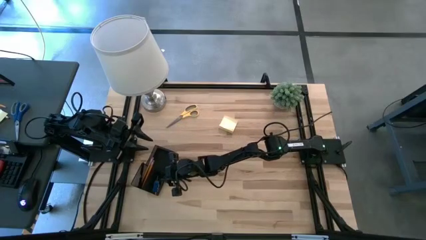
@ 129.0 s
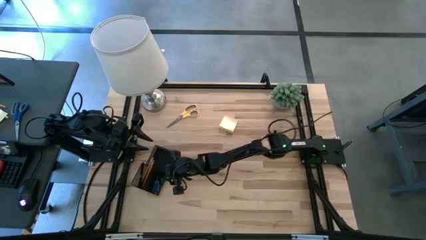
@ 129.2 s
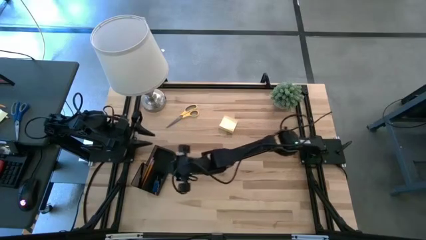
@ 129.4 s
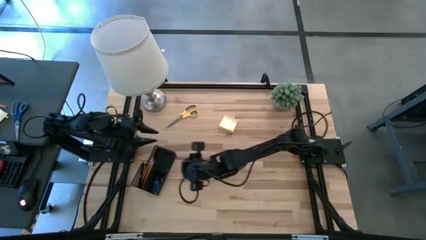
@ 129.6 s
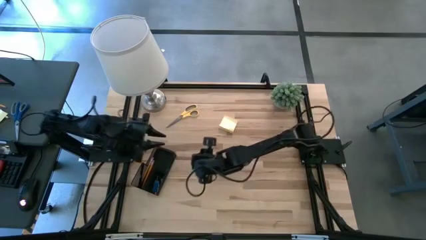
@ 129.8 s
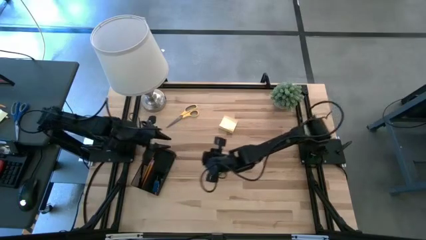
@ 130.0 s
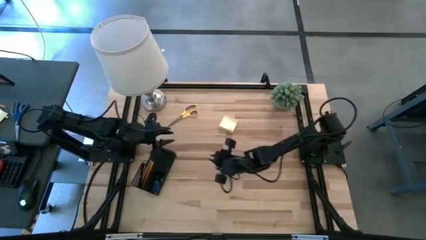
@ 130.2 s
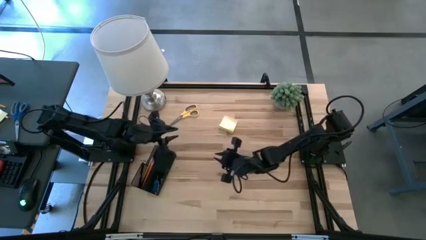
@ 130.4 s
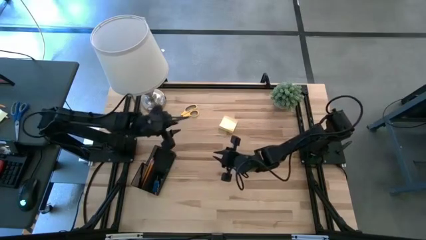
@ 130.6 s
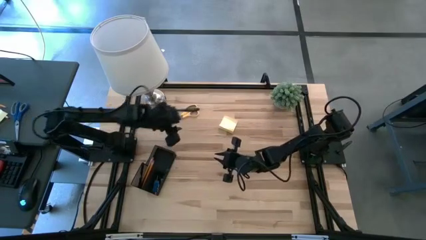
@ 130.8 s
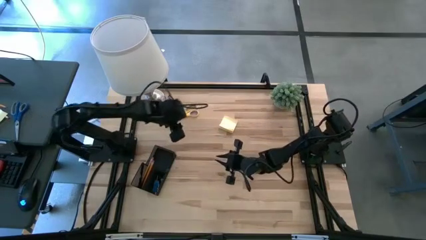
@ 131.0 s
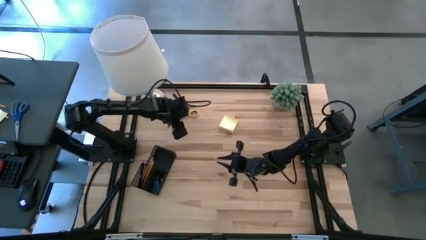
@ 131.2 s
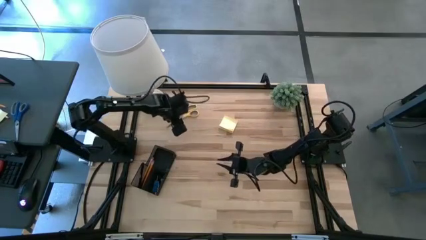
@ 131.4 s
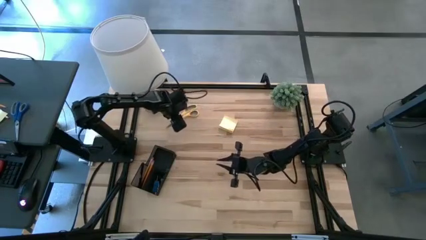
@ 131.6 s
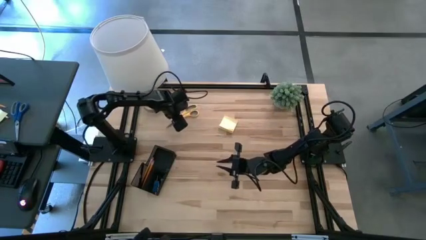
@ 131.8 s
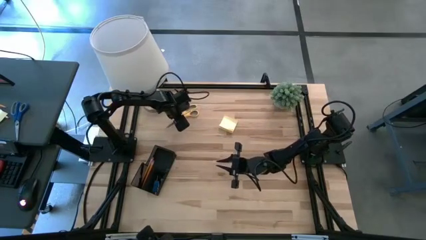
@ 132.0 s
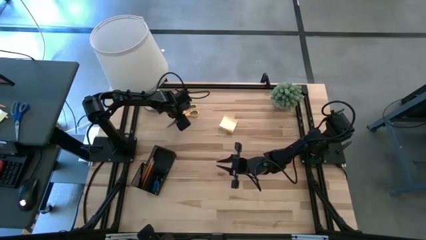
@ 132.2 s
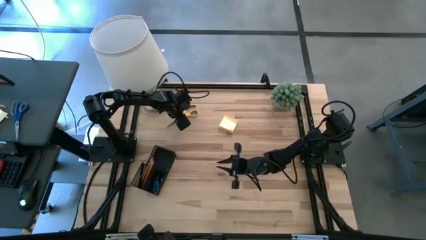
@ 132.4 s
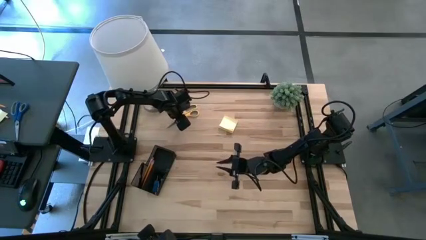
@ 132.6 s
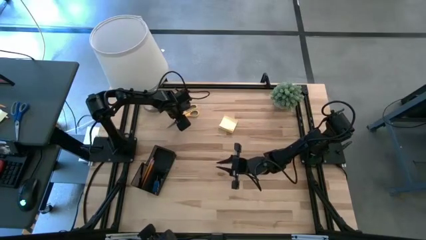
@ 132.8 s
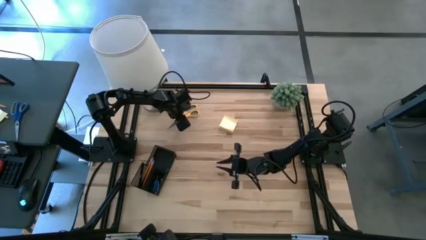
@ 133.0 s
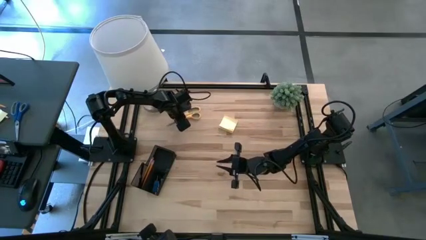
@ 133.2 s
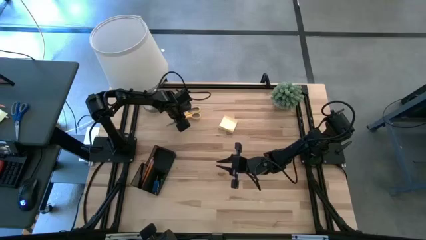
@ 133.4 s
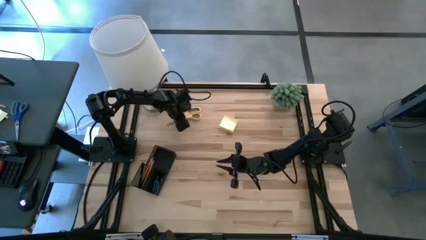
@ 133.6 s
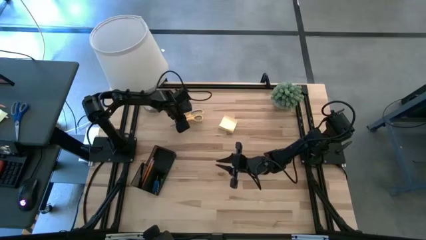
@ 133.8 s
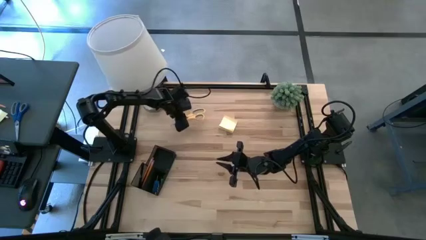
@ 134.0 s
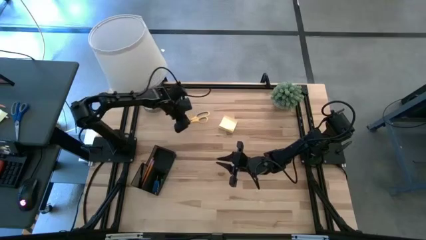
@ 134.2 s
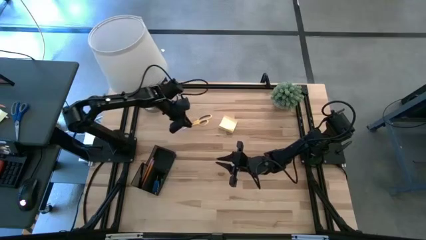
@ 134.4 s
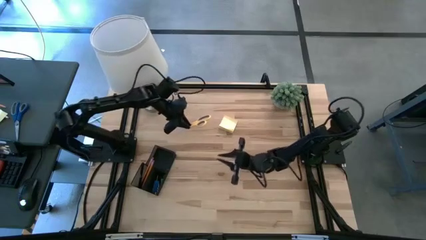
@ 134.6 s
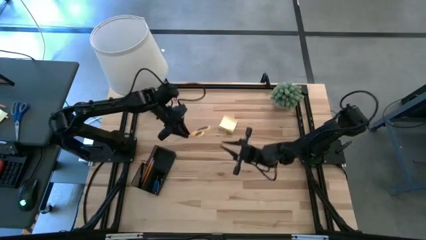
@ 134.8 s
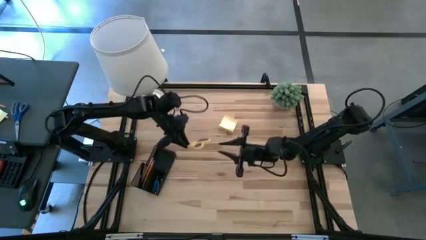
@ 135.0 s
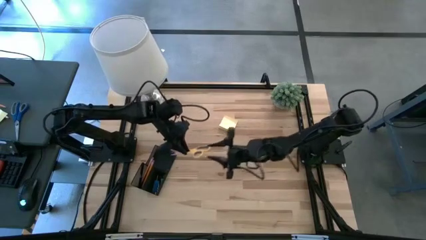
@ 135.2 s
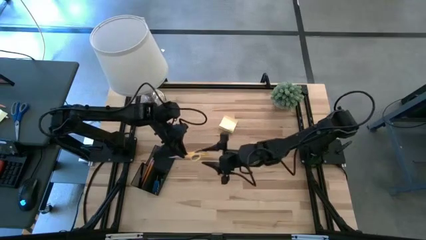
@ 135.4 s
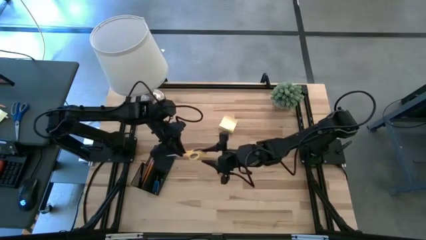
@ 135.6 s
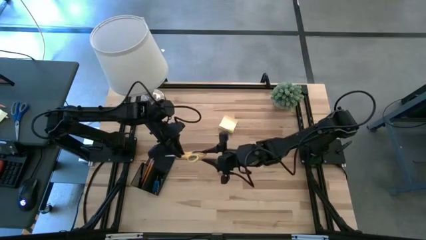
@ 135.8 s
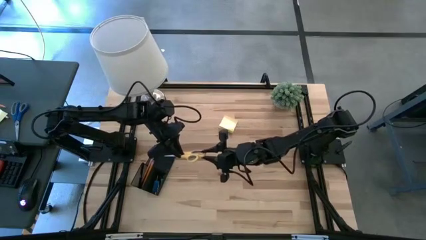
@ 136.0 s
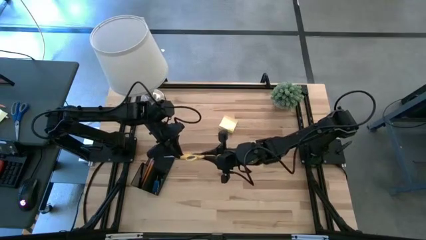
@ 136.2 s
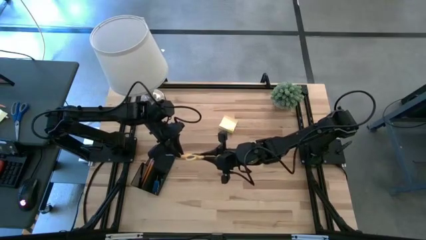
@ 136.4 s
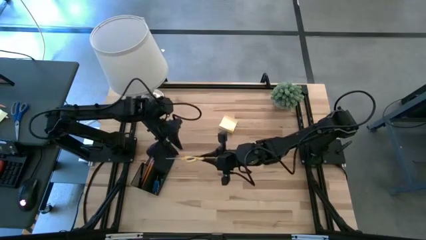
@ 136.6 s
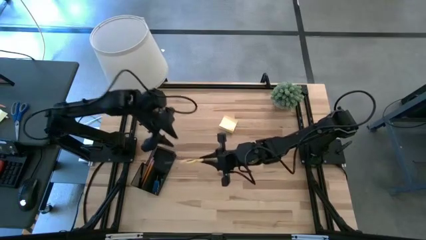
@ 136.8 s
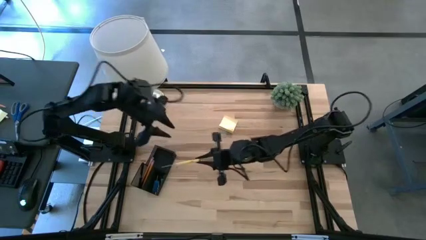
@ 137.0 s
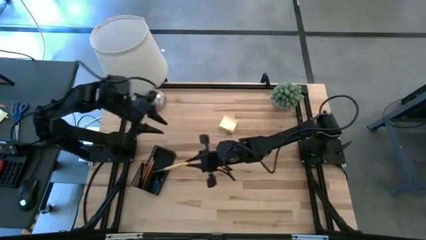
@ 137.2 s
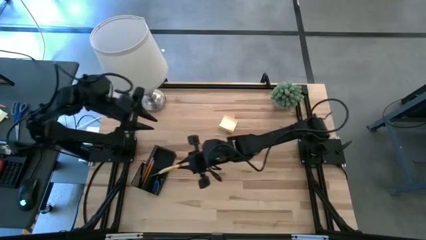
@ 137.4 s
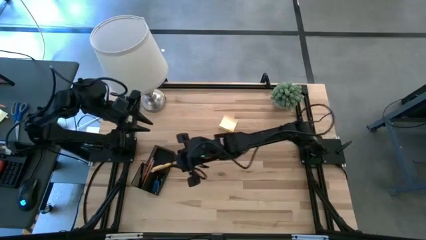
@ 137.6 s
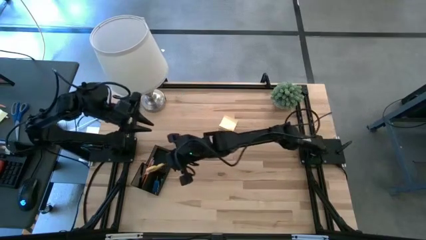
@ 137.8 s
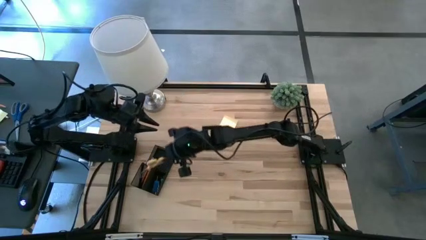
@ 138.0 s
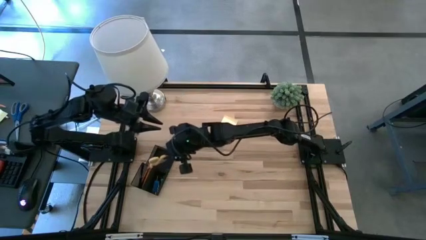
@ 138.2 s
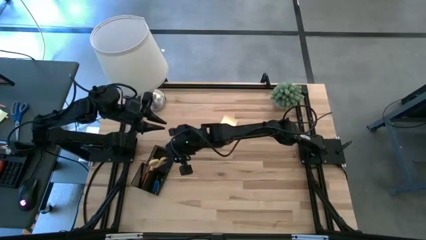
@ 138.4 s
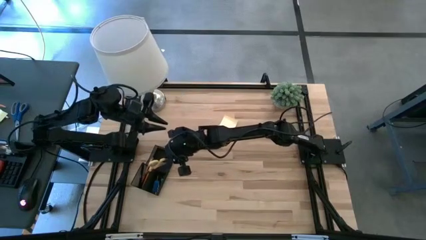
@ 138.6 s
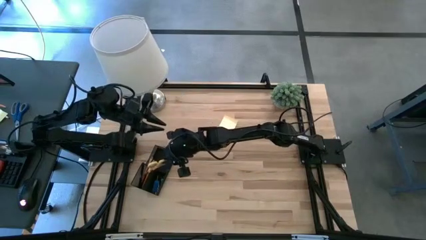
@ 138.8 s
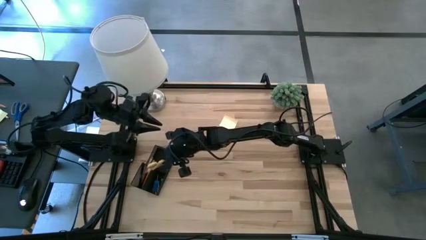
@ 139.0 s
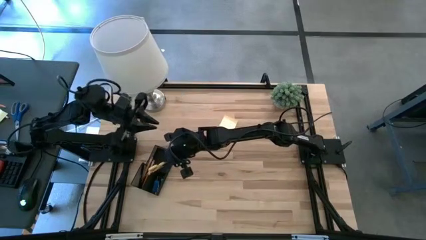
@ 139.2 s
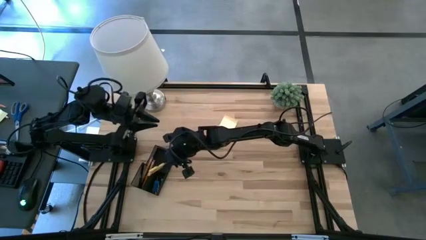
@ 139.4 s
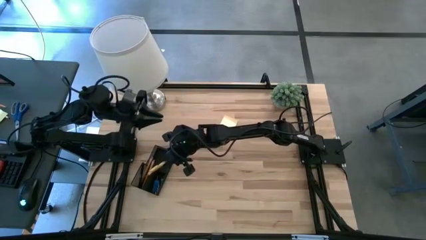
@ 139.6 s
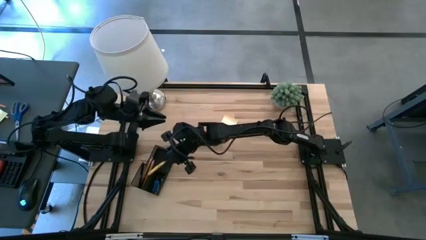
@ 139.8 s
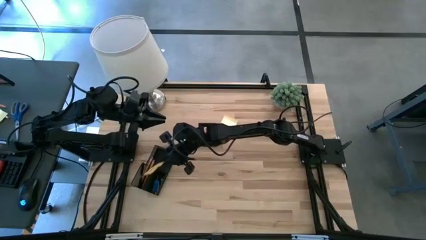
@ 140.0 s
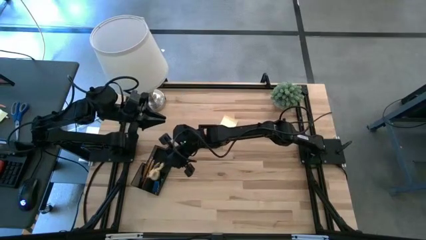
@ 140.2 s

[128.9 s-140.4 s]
Task: Pick and place office supplies into organizer
Put the yellow scissors into the black desk organizer

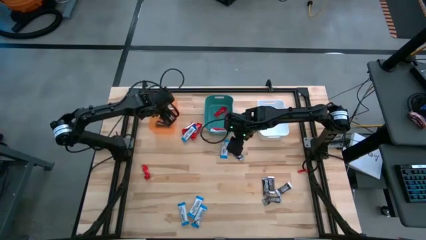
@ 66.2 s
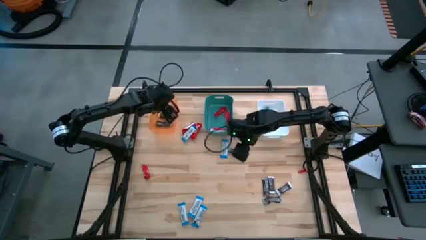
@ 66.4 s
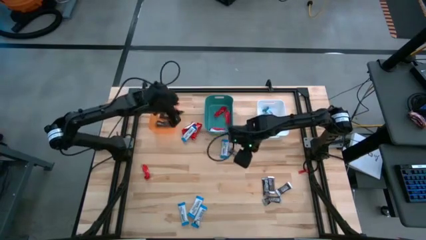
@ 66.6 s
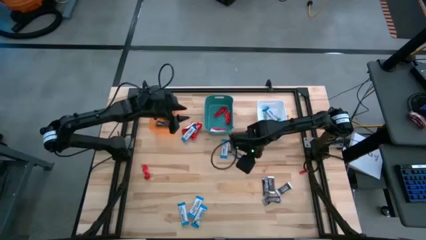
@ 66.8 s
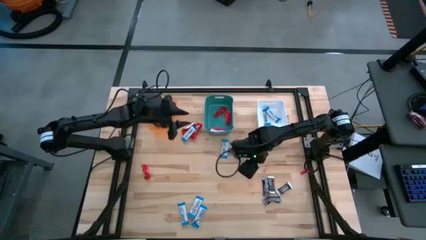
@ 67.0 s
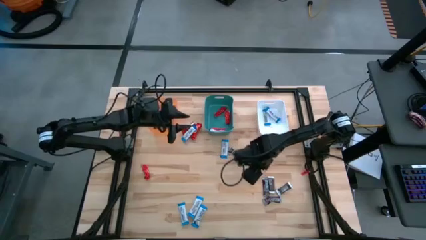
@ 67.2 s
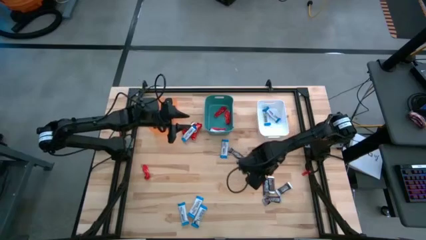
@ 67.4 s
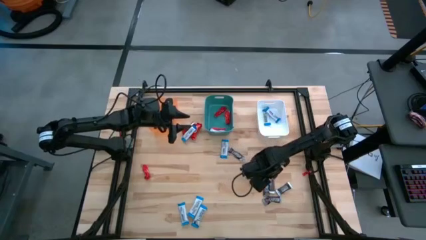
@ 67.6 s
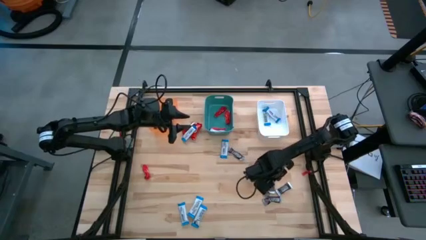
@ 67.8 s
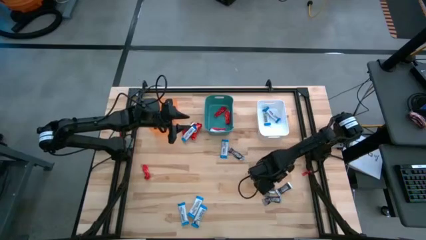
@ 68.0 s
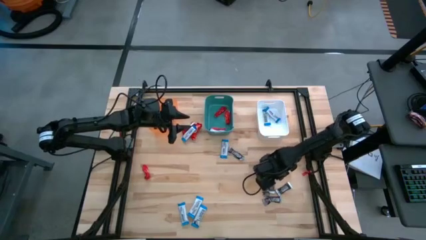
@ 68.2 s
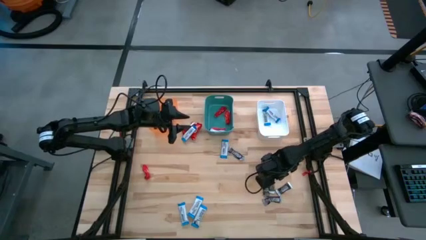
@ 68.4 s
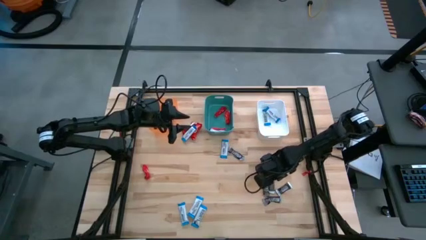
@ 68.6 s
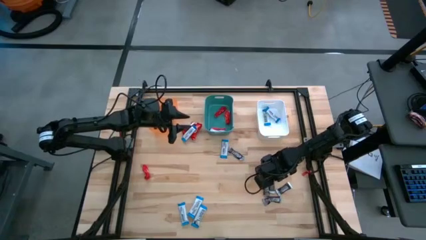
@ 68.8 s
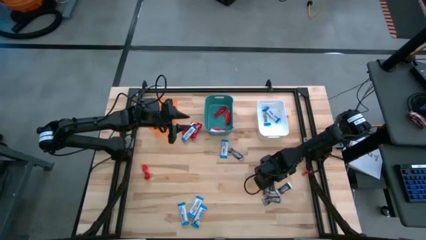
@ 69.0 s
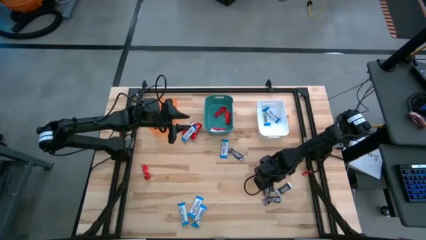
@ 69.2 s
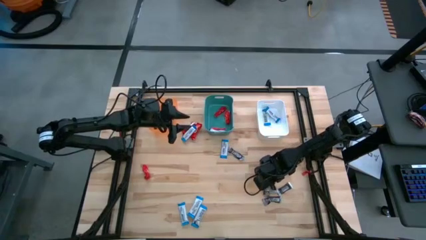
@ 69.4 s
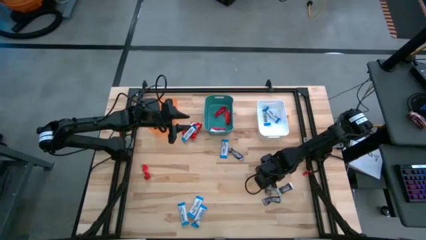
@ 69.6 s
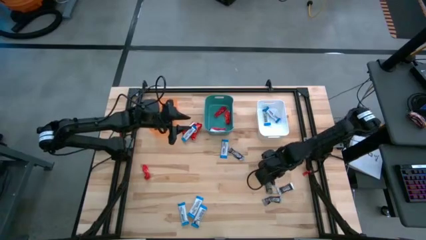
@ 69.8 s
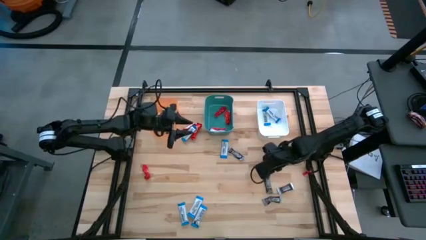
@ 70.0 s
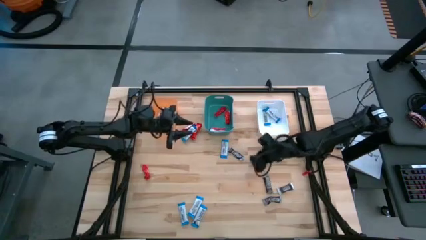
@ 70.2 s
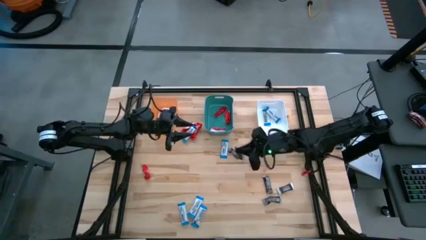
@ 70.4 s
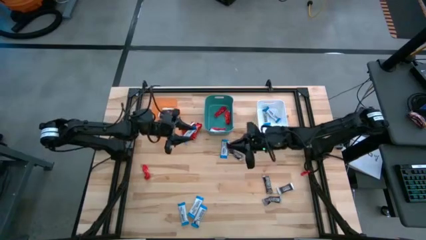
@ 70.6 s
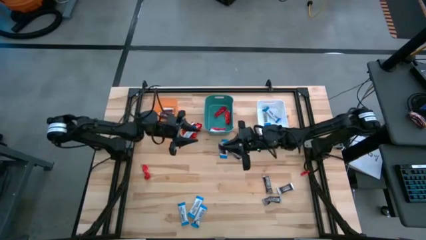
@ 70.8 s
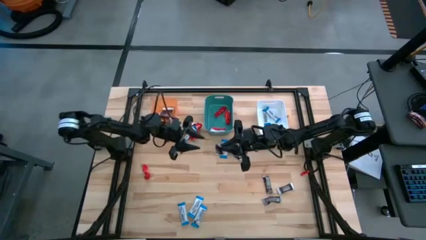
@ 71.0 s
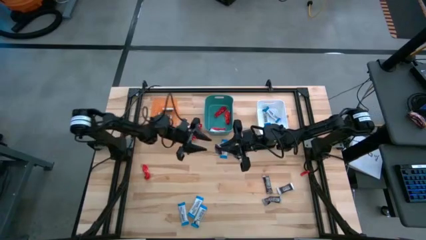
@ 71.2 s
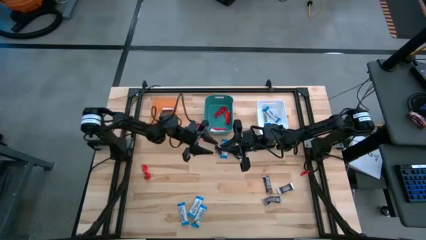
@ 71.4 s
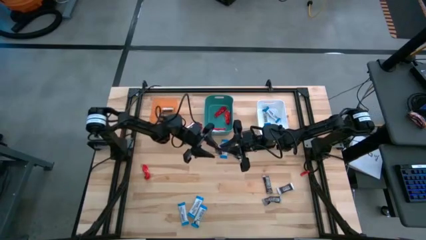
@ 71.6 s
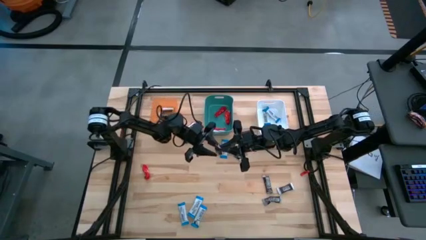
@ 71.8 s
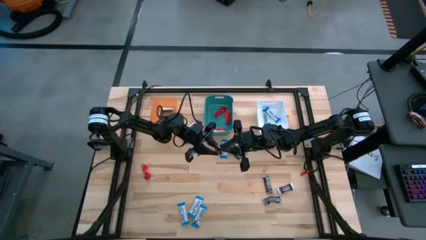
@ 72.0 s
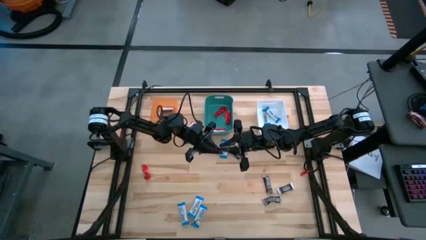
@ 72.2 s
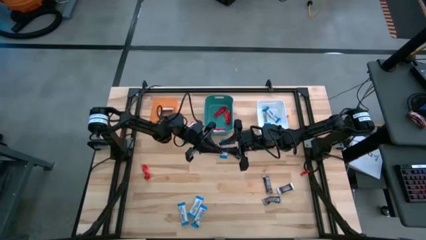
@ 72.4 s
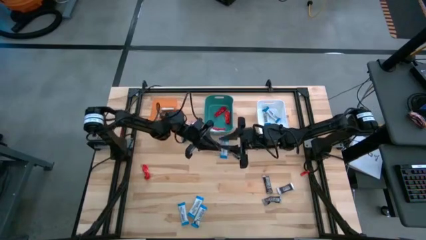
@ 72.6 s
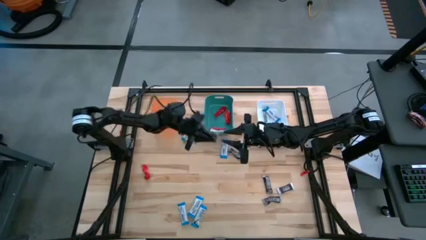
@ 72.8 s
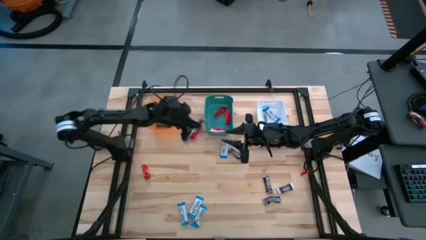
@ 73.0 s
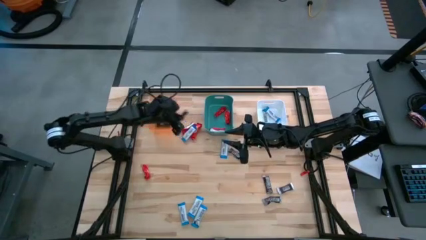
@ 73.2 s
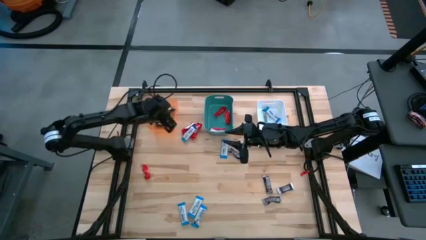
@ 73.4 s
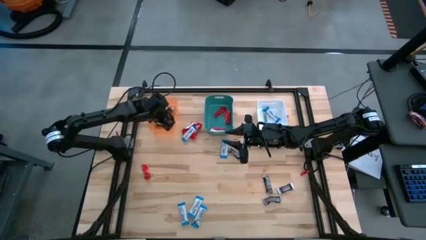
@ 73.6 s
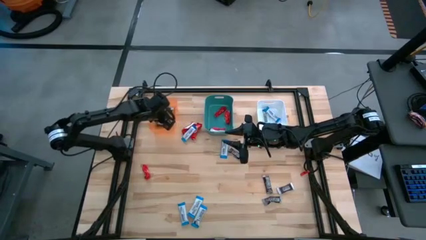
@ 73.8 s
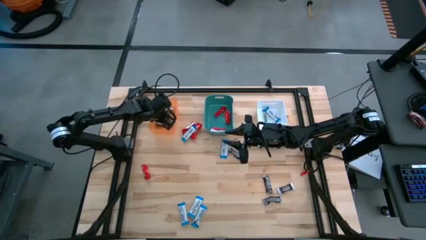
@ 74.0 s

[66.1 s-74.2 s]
Task: Organize candy in baskets
Put the black chocolate bar into the orange bin
